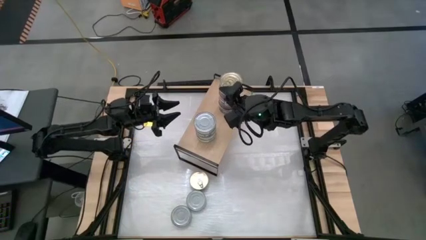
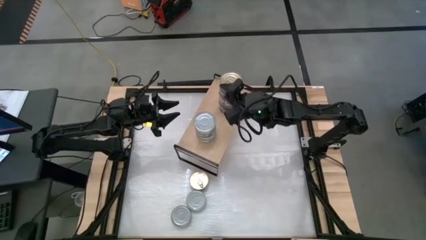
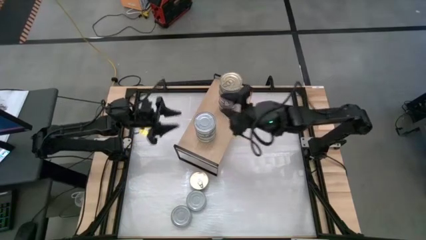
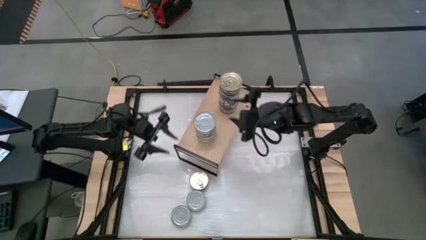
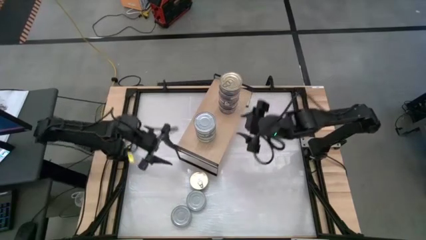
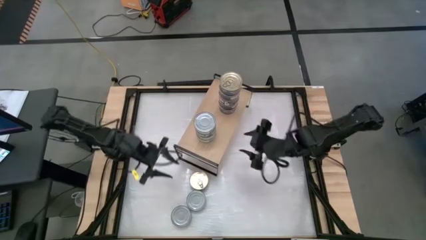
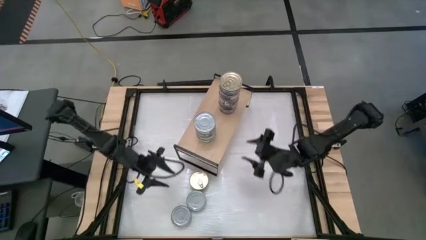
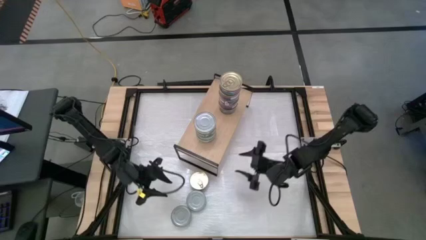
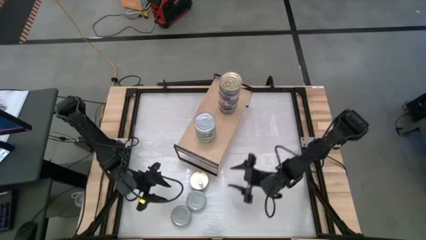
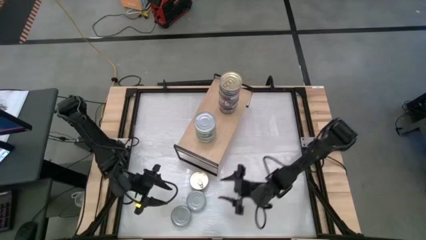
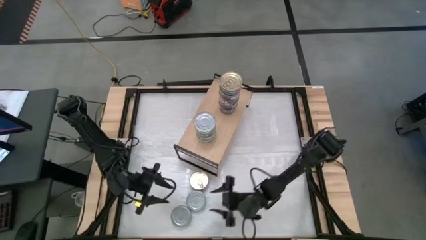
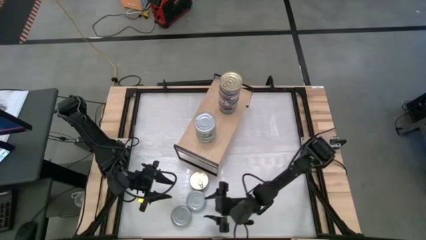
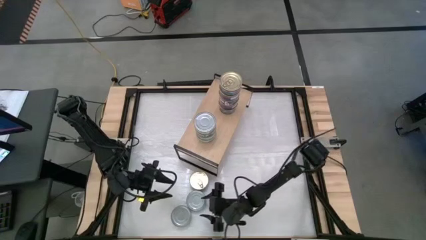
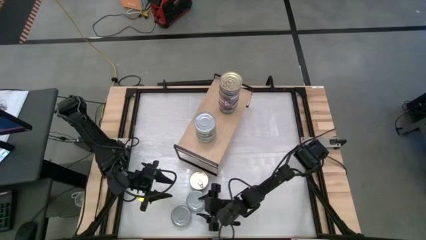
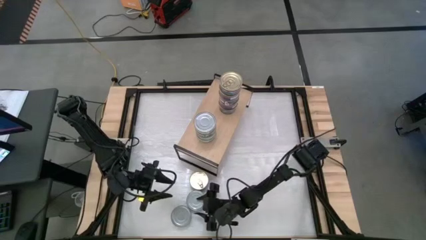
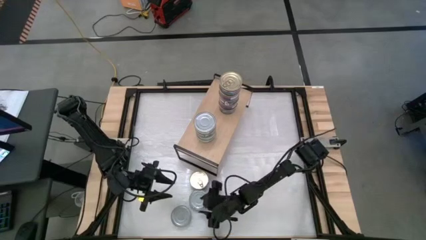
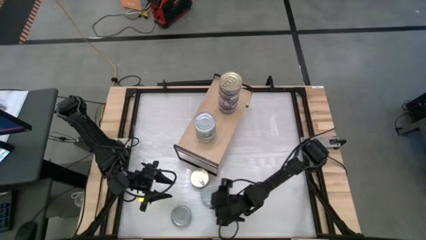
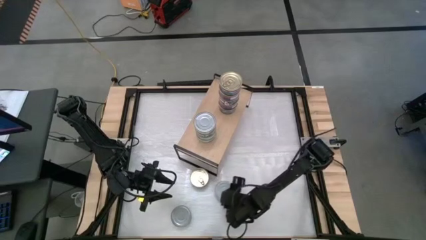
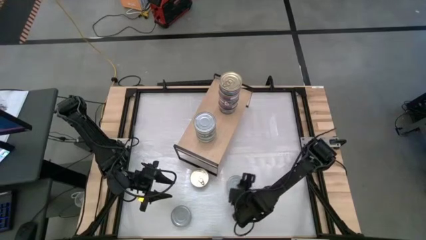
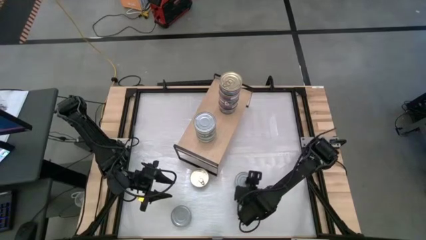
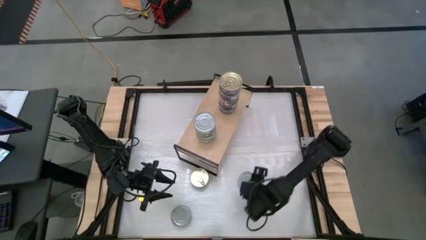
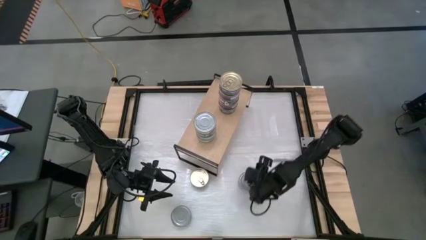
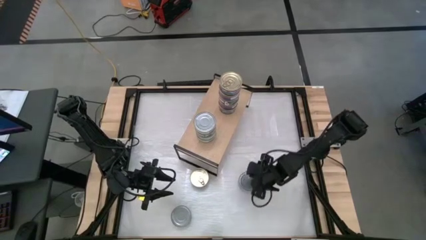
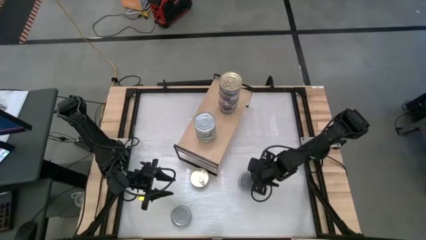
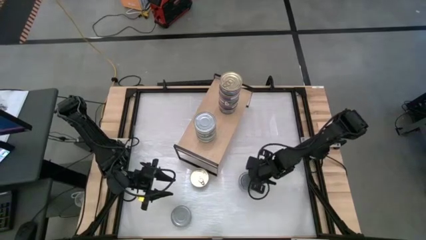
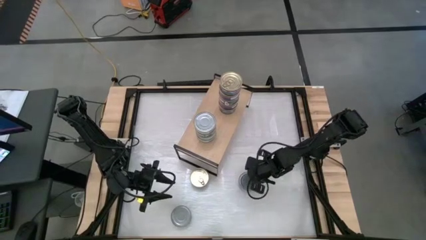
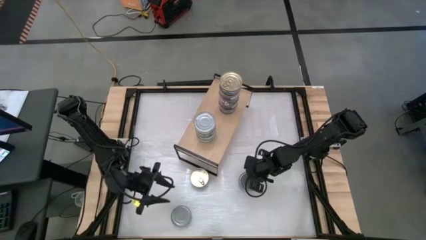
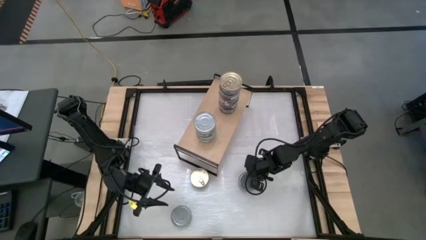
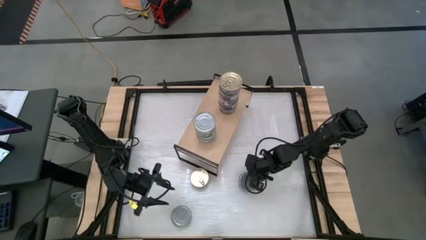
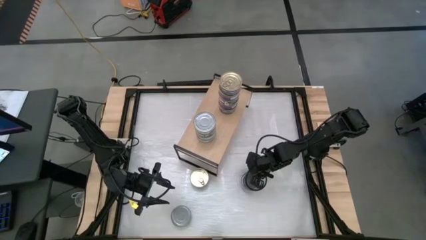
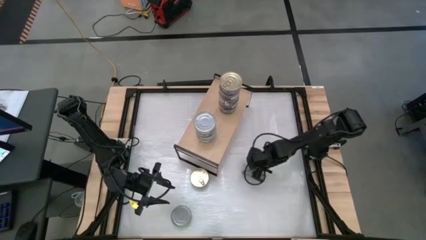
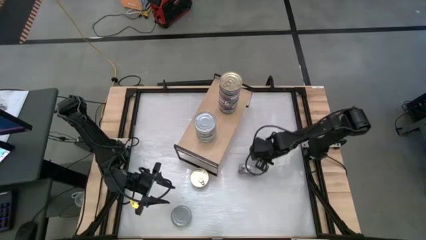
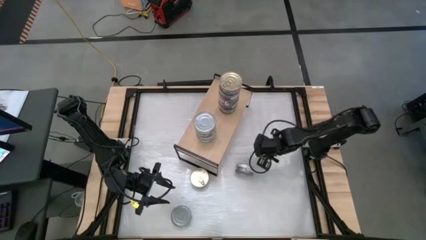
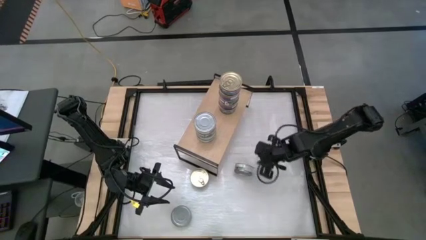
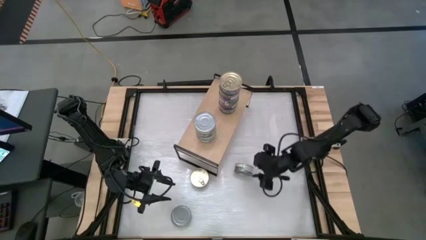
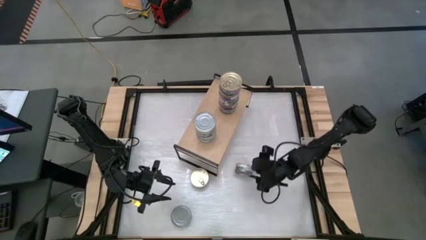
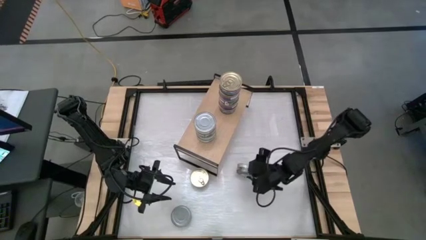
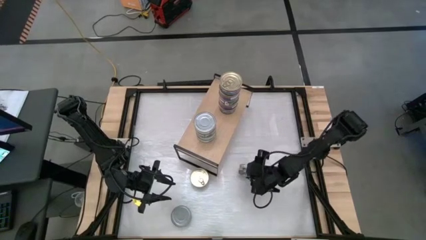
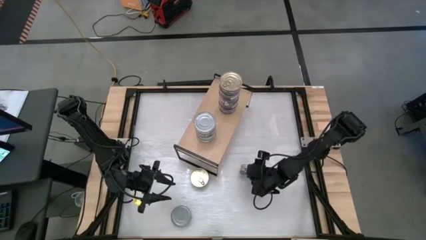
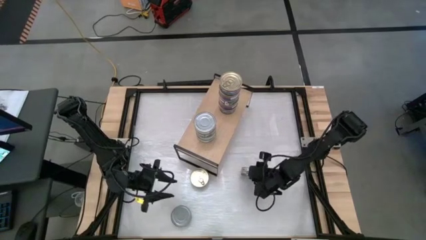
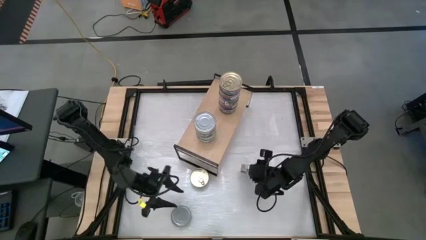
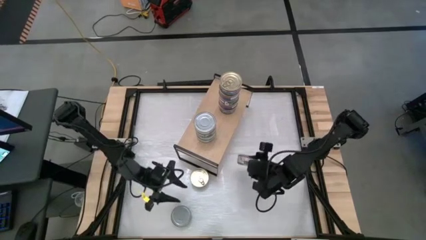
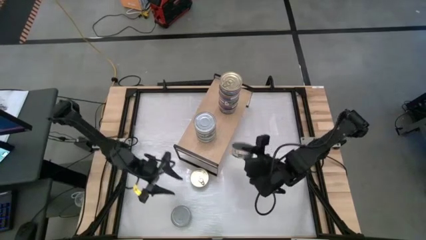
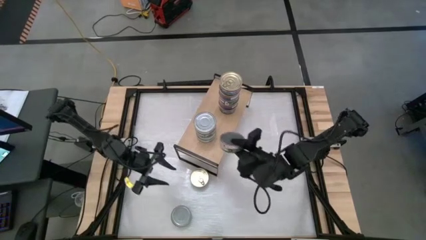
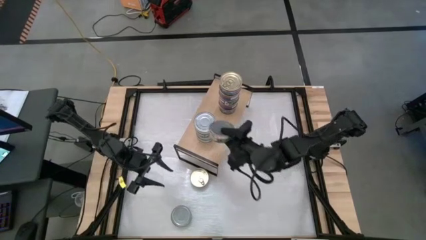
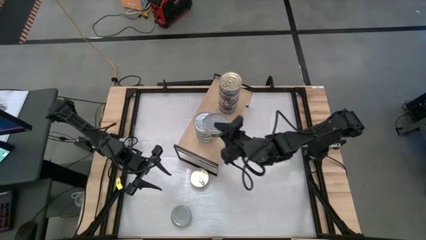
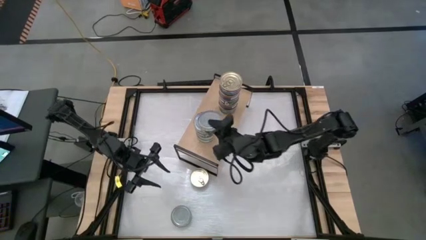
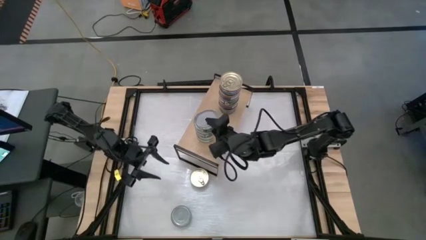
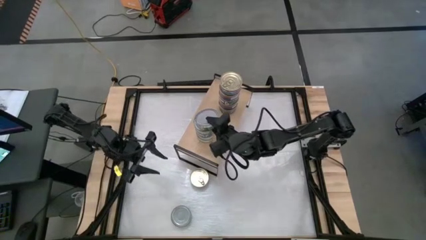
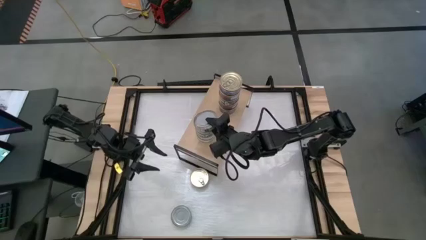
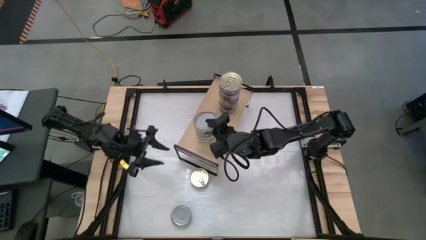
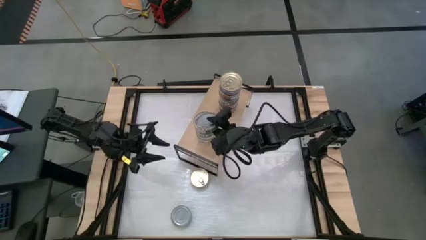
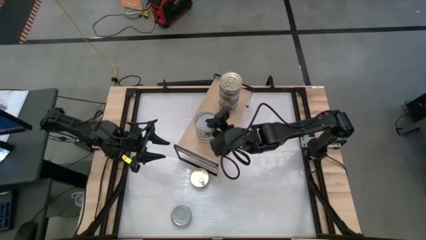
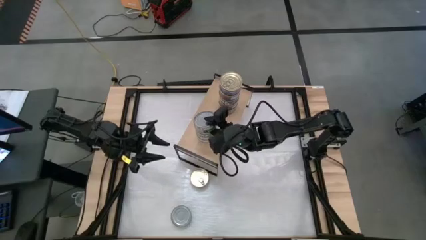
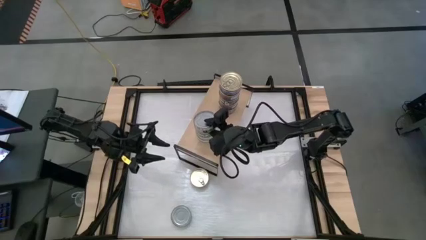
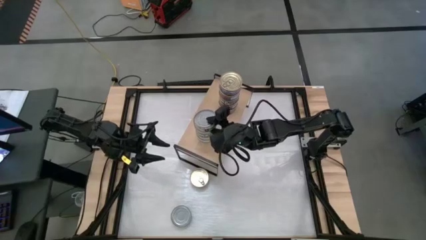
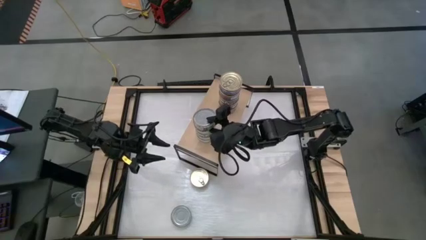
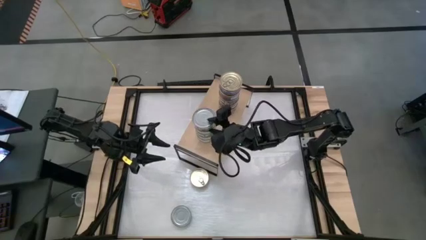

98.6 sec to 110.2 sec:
Task: Stack canned seafood by type on shelf
Stack the green tuna can on top of the stacked green tuna can on the shelf
